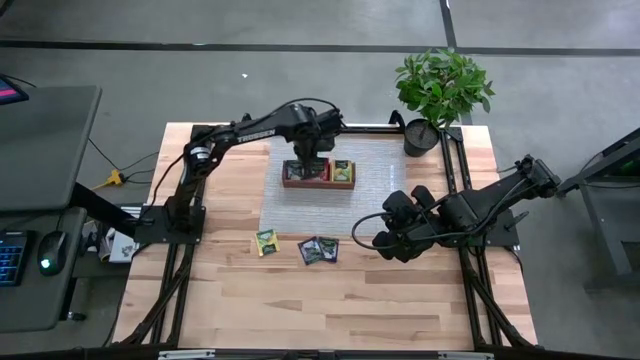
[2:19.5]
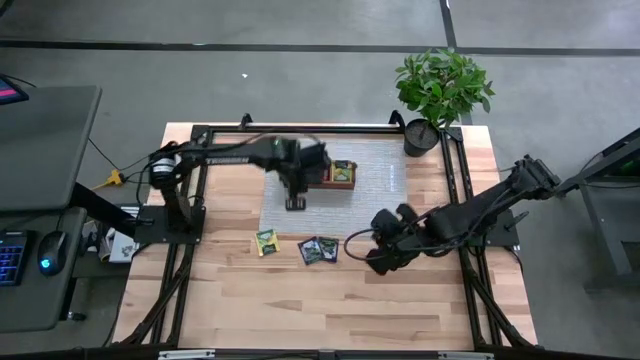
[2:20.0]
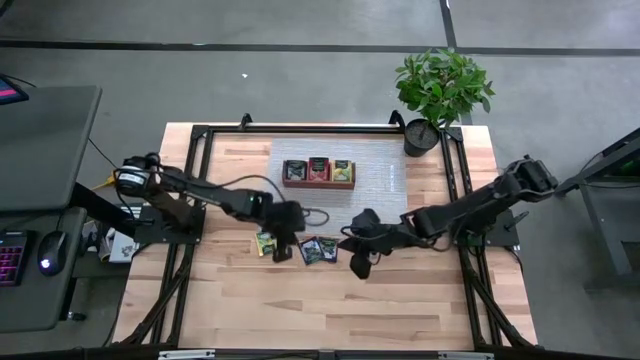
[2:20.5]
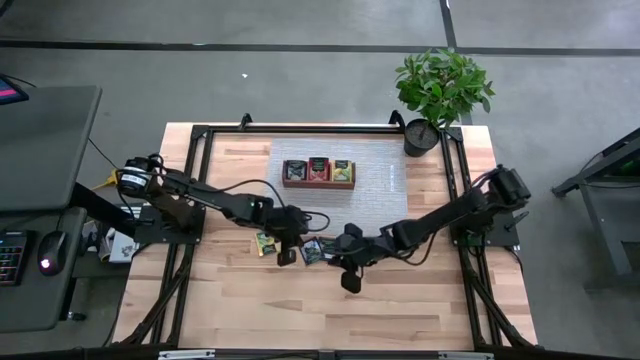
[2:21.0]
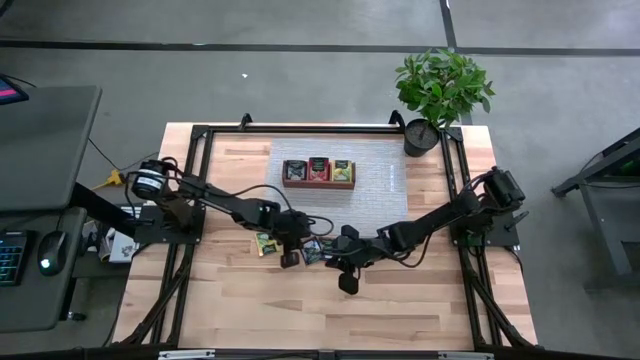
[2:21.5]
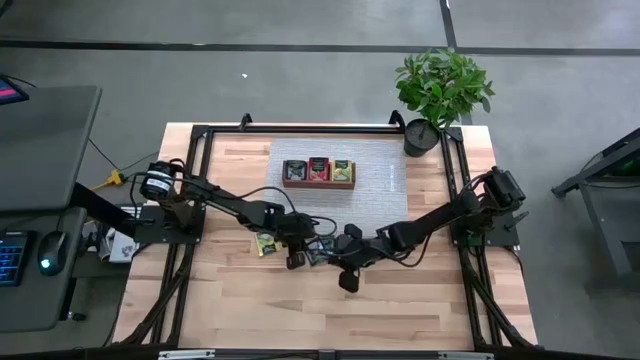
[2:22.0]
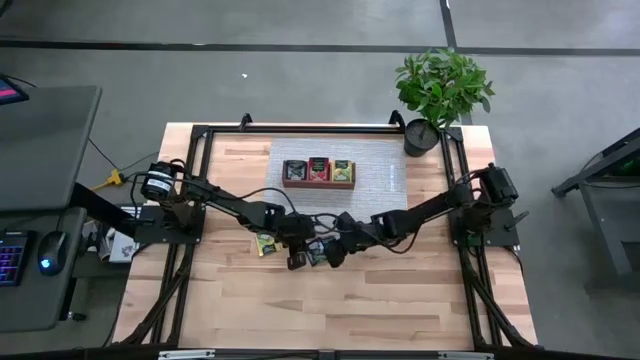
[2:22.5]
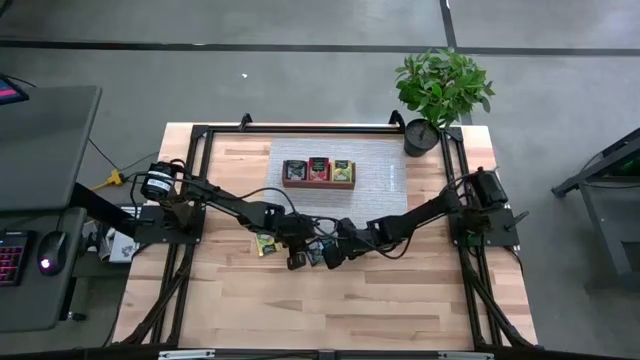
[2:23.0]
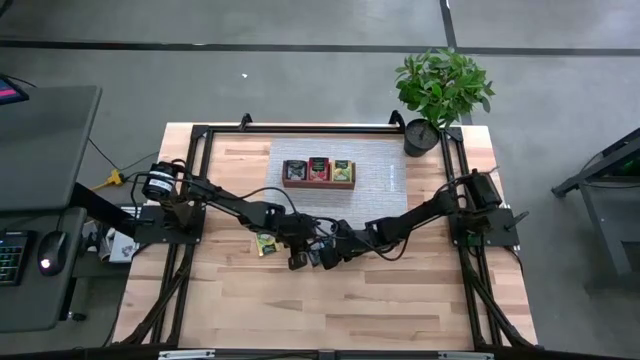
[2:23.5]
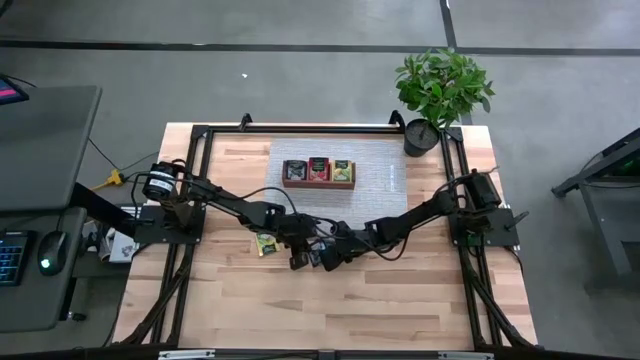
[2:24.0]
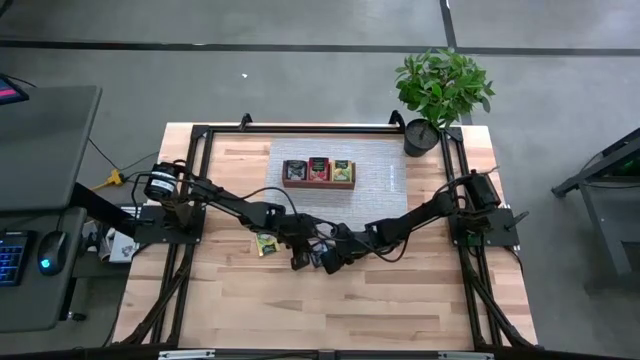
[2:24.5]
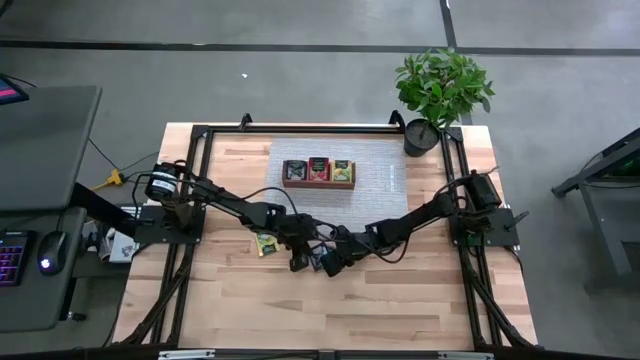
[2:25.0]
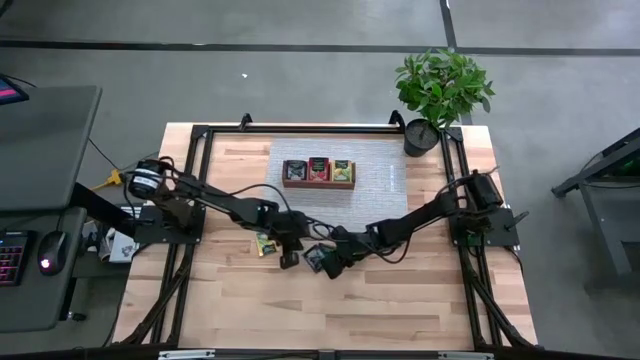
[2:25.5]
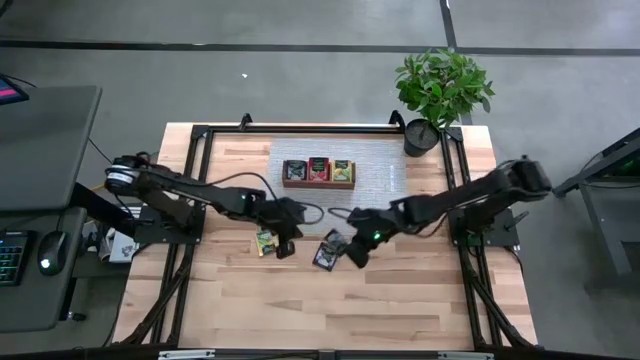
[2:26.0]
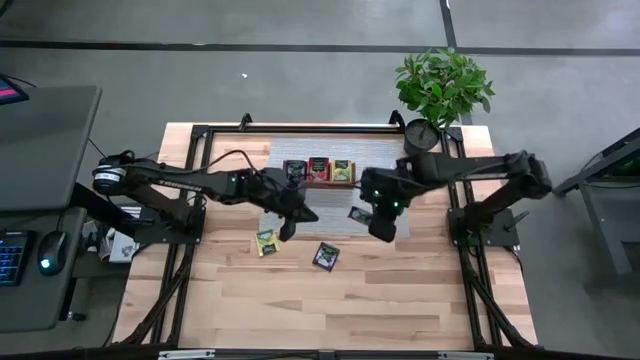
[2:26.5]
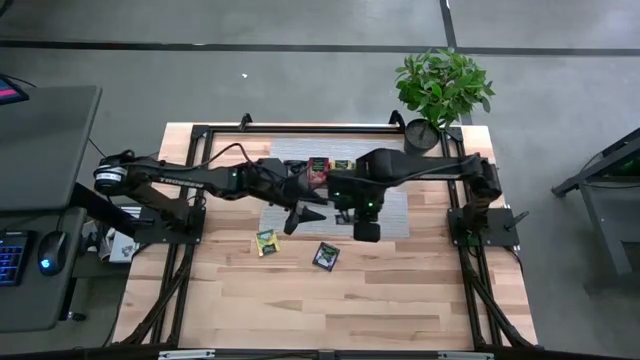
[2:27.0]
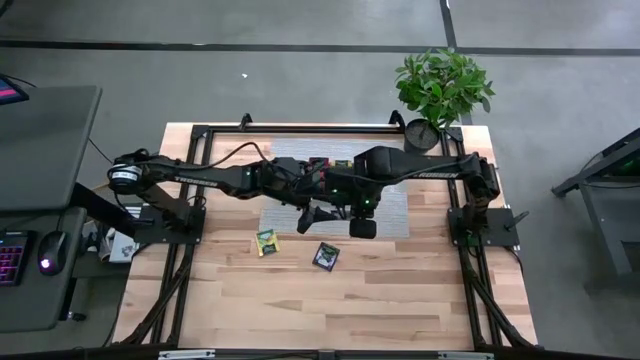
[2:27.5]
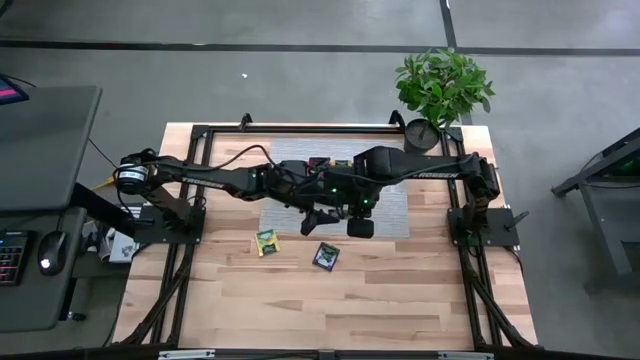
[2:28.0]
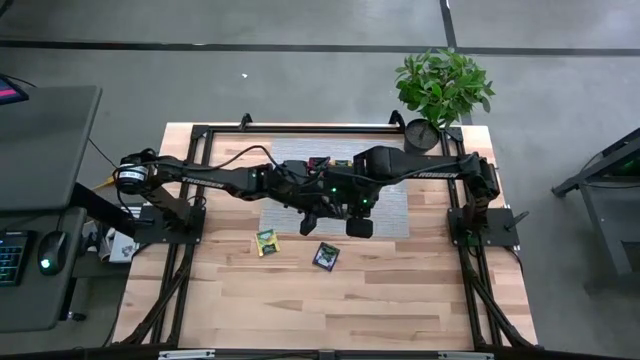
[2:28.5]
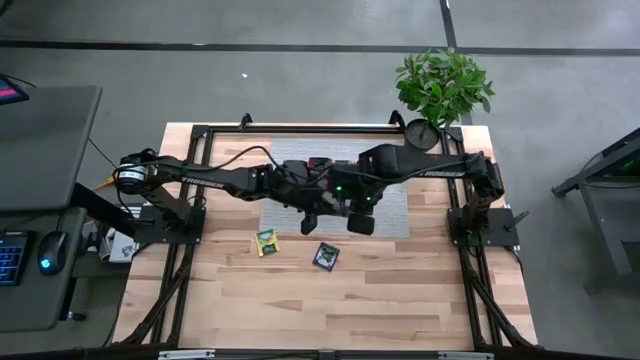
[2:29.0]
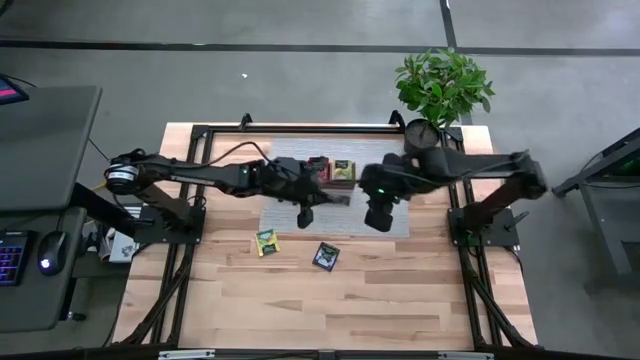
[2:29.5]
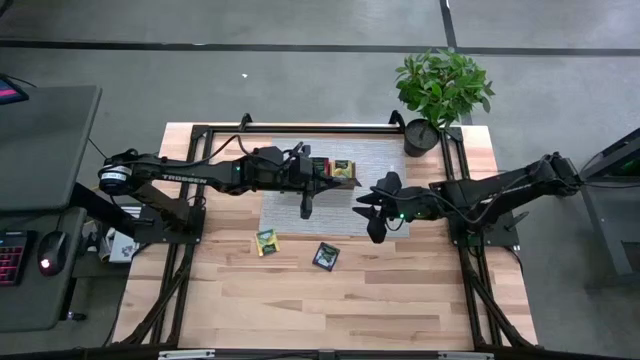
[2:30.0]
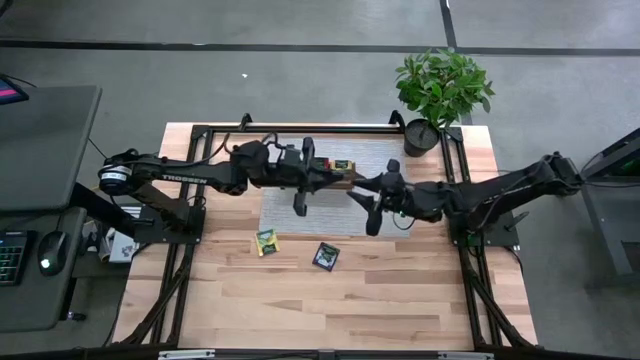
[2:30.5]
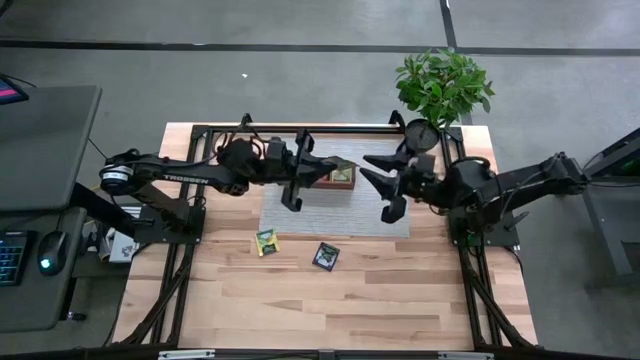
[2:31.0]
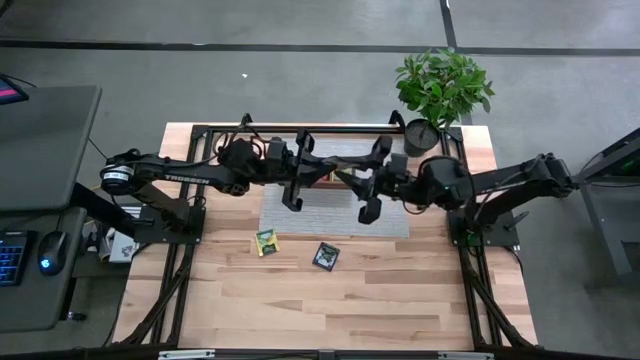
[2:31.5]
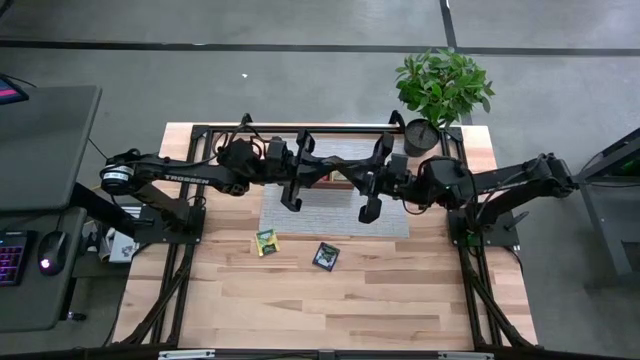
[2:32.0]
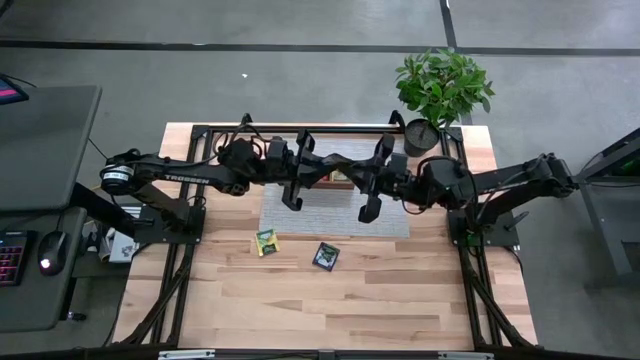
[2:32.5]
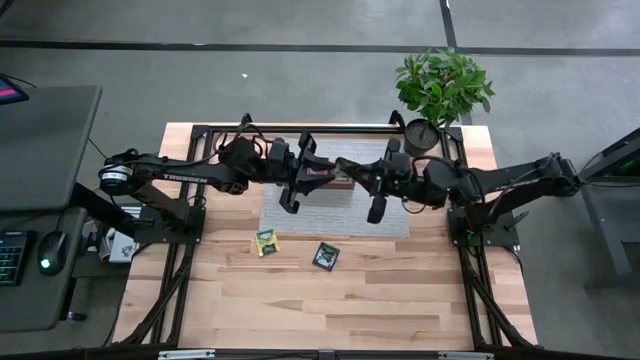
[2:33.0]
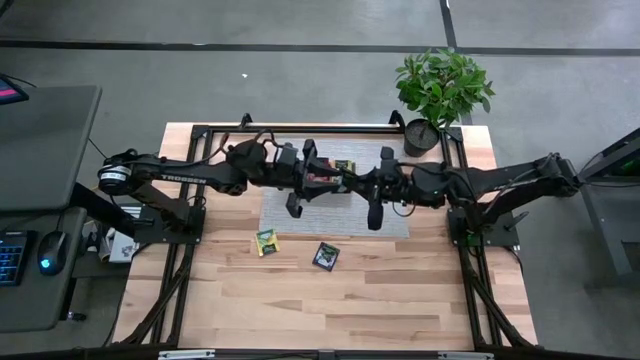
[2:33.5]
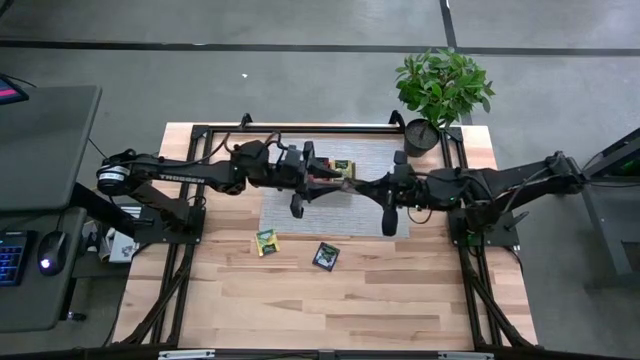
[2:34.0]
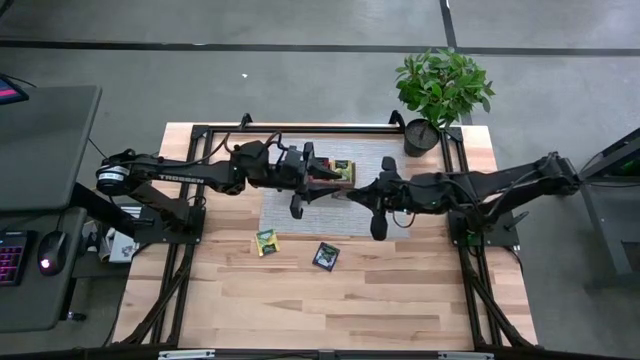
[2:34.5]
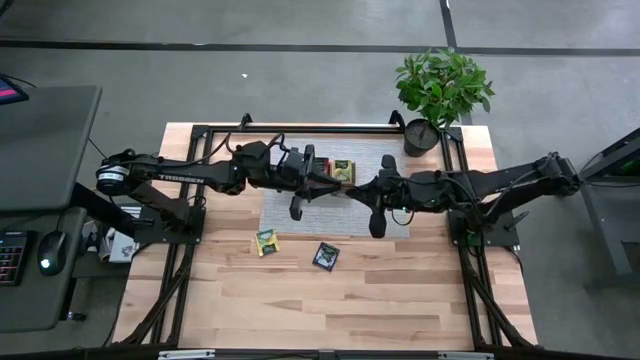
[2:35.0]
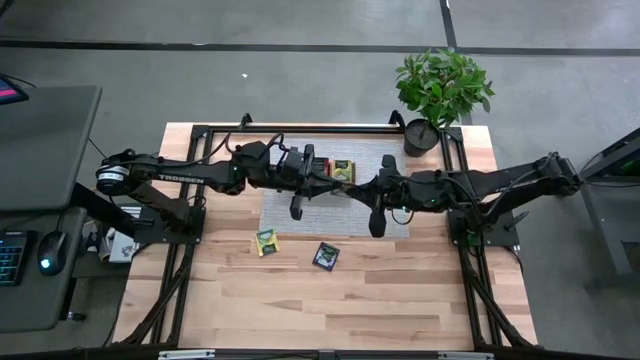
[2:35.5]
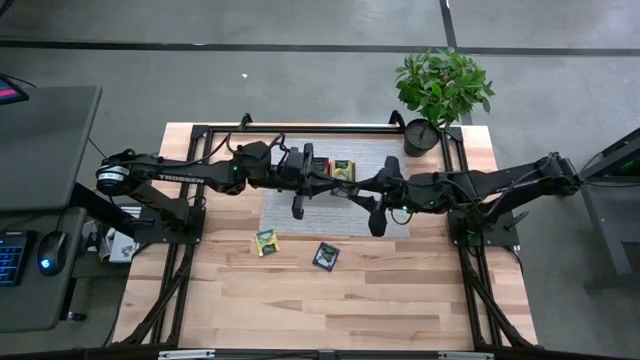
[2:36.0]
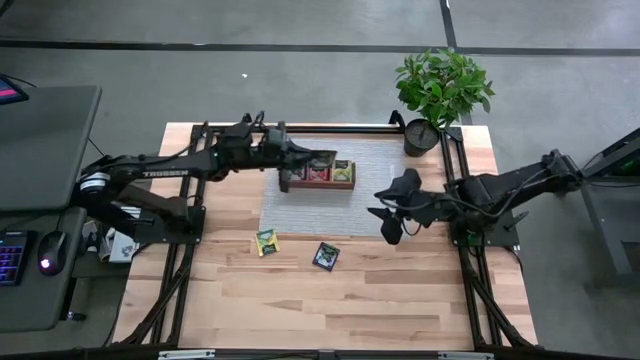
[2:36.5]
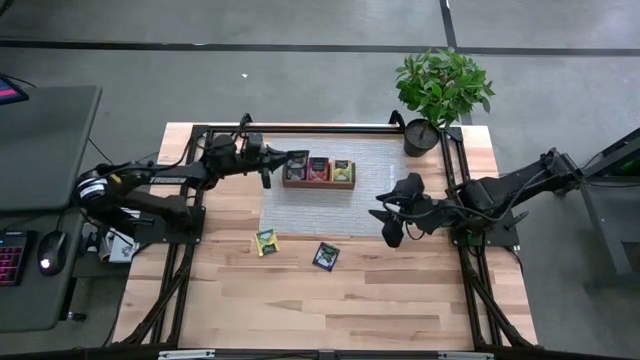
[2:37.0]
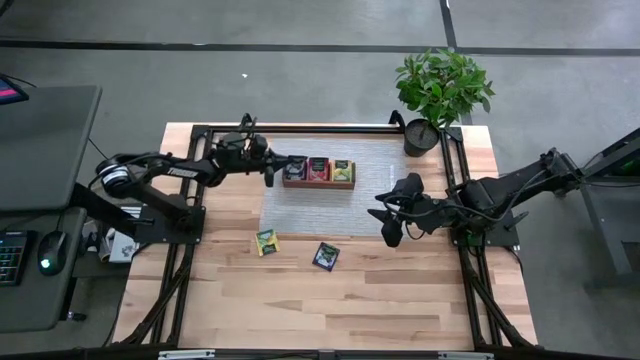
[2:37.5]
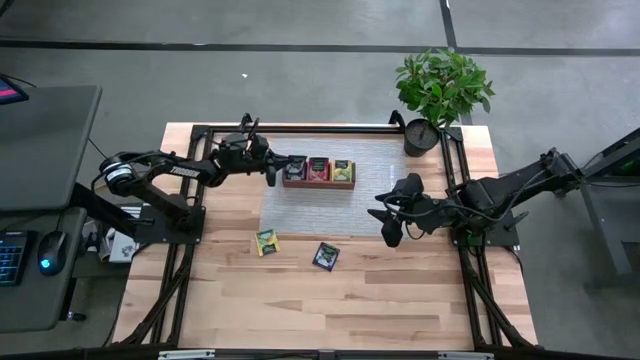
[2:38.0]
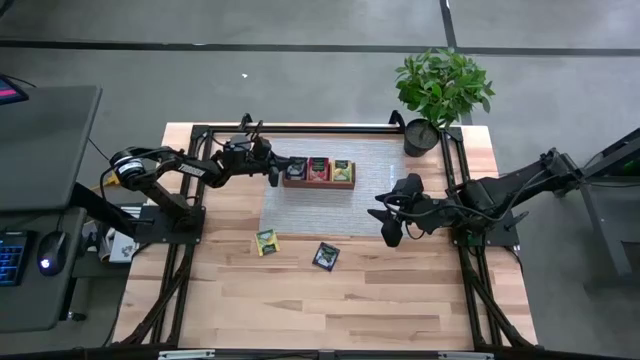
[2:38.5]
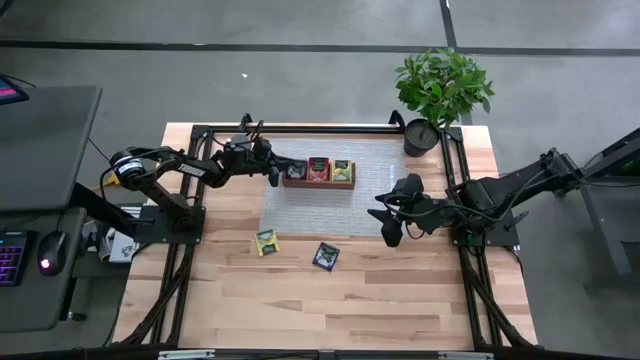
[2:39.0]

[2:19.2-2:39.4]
Task: Pick & Place Tea
Put the violet tea packet into the left side of the brown organizer

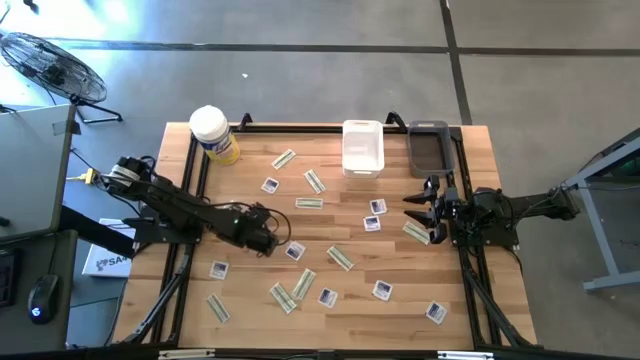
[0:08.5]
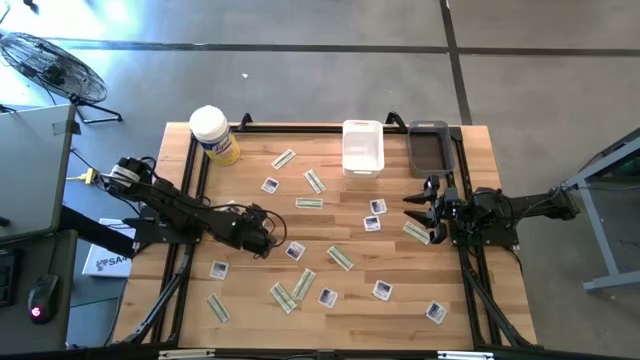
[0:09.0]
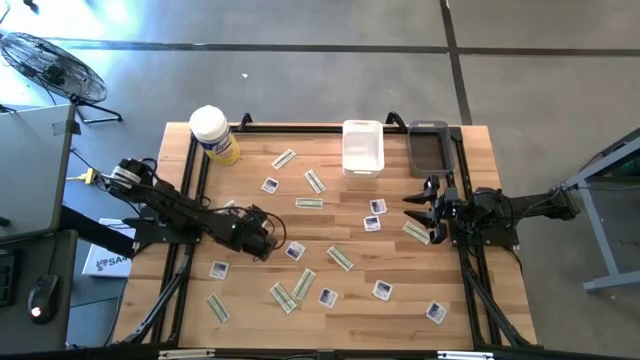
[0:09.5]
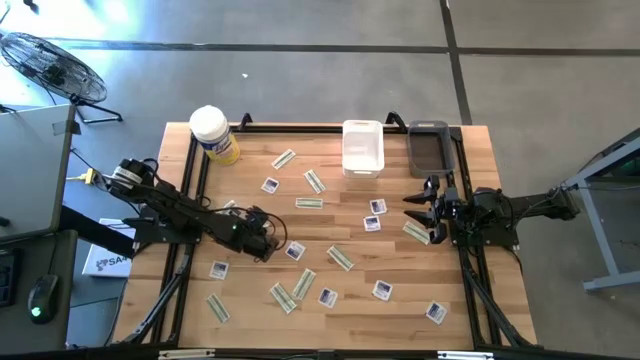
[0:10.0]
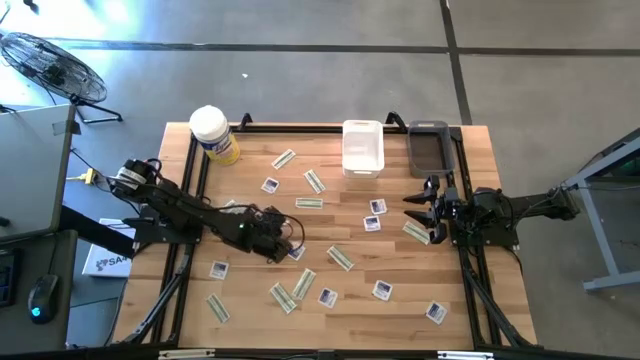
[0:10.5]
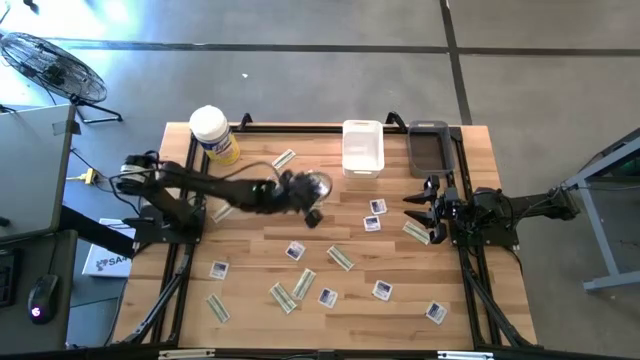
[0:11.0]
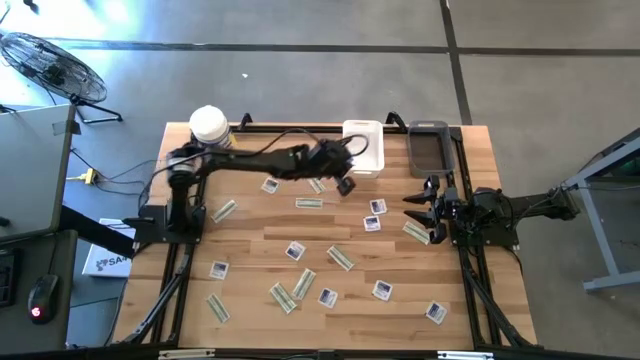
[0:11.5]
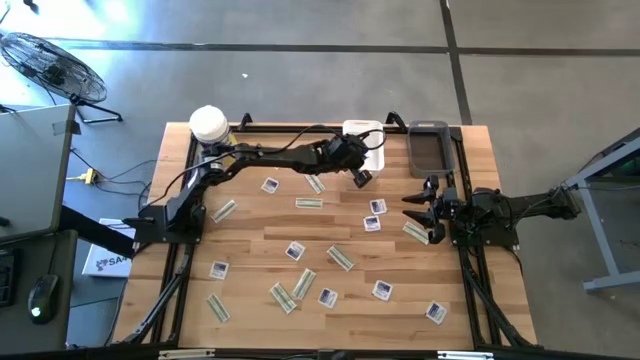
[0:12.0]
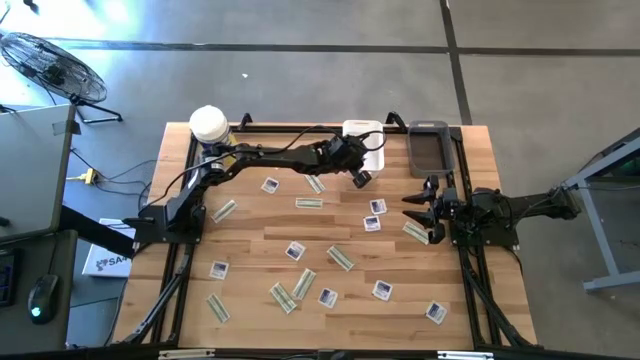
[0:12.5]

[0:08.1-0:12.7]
Task: Pick & Place First Aid Supplies
Put the blue alcohol pad into the white bin
